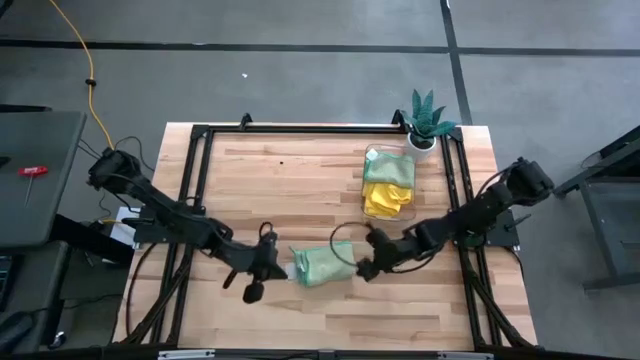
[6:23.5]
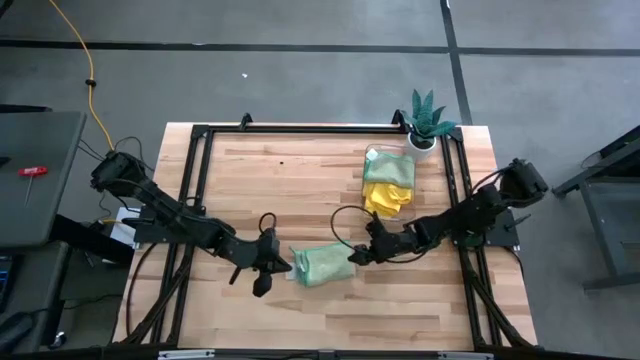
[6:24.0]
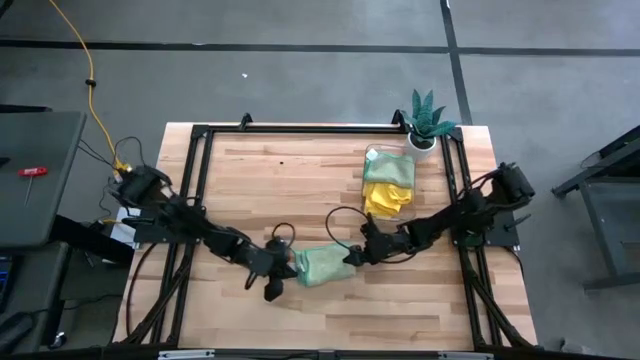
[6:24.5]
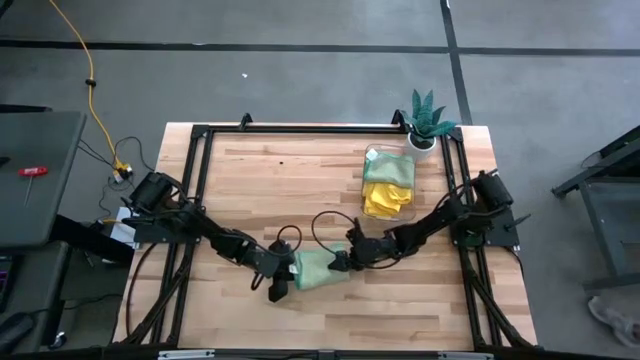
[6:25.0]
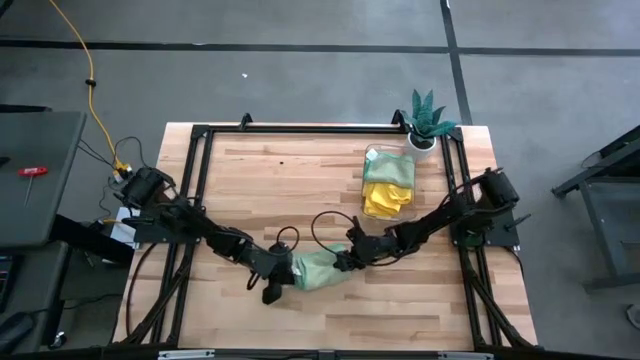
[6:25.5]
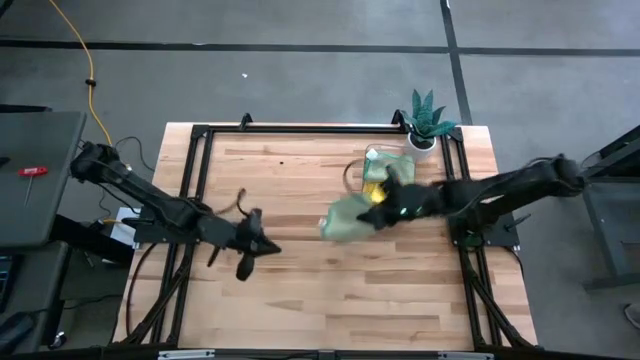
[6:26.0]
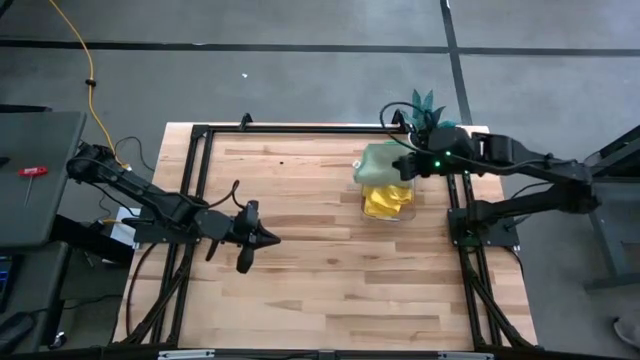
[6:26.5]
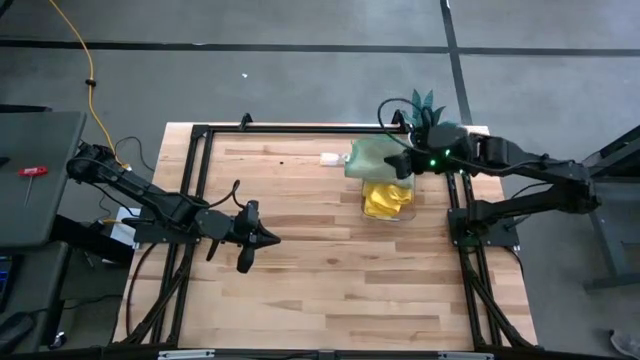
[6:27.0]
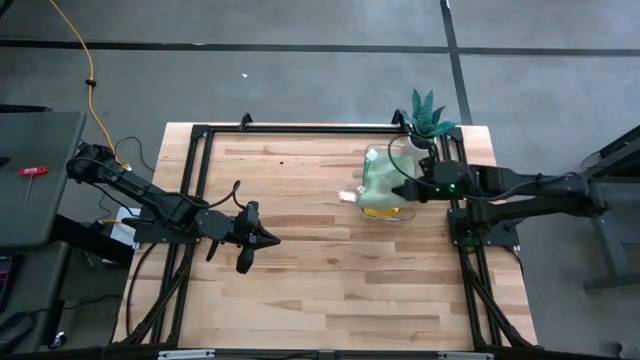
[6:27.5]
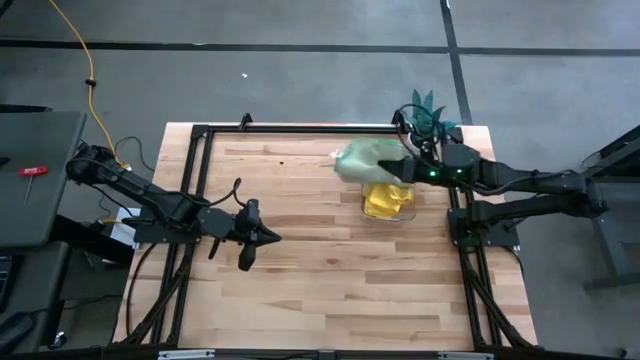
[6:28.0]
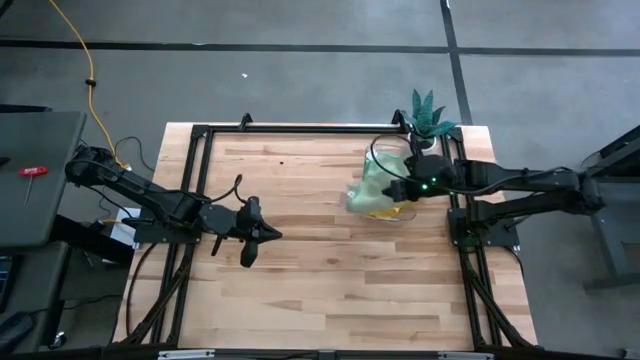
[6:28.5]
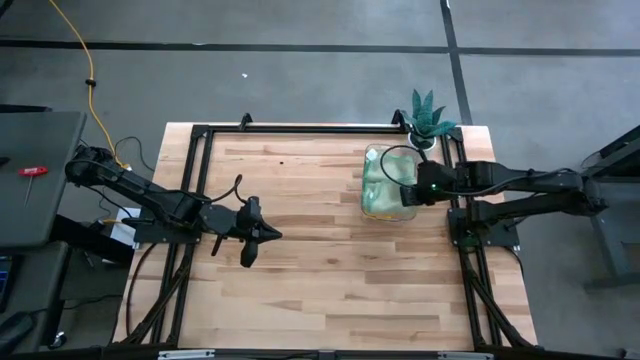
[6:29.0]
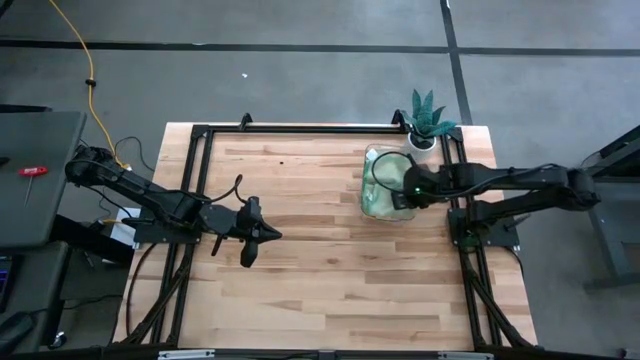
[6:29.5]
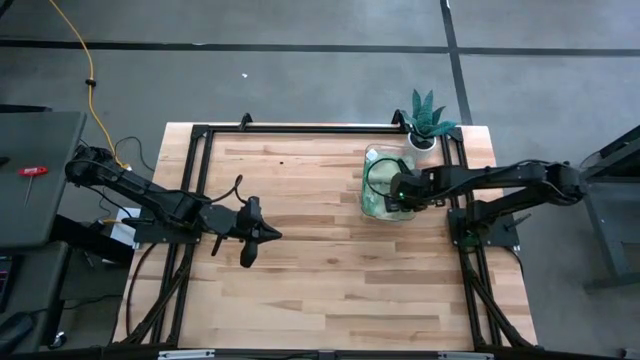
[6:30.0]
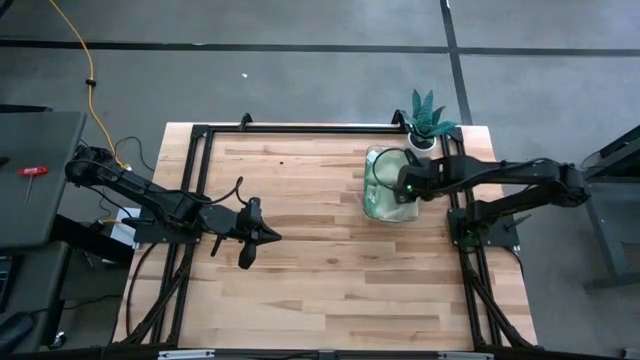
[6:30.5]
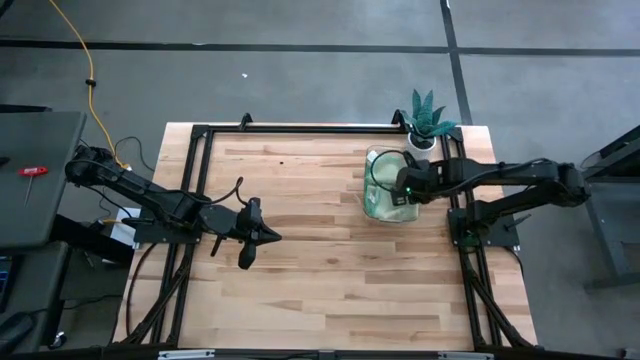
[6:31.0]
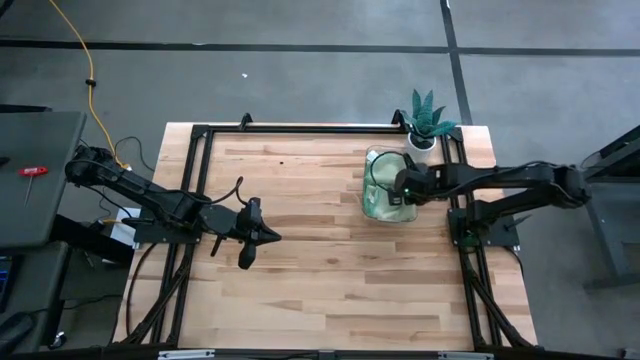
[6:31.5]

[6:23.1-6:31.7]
Task: Fold microfiber towels
Put the folded green microfiber towel into the transparent bin

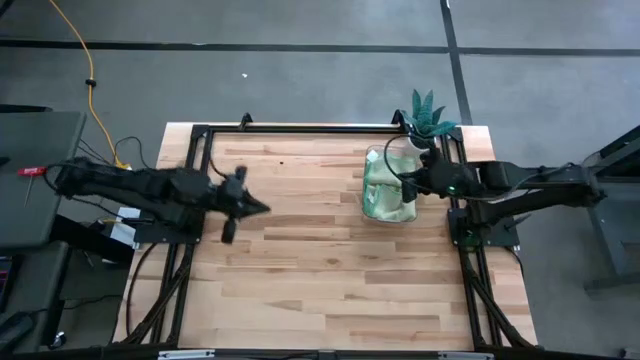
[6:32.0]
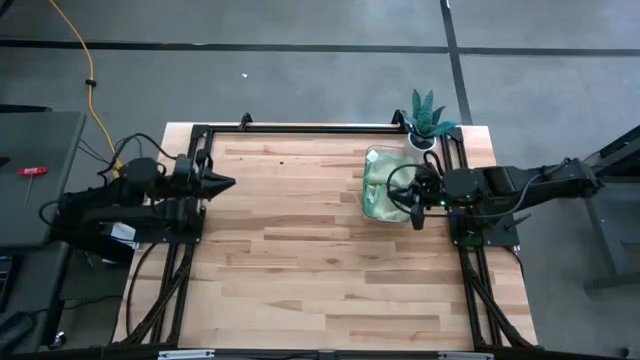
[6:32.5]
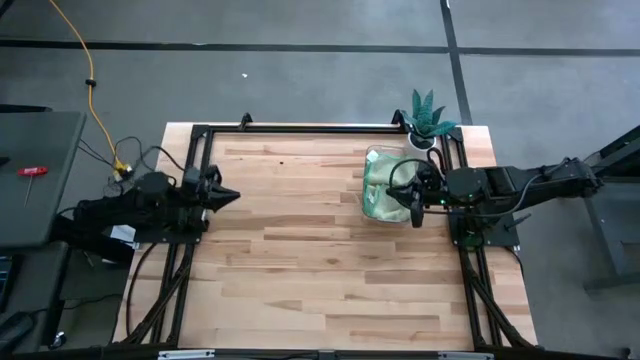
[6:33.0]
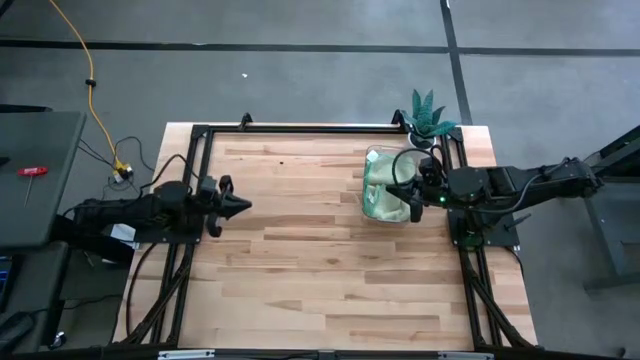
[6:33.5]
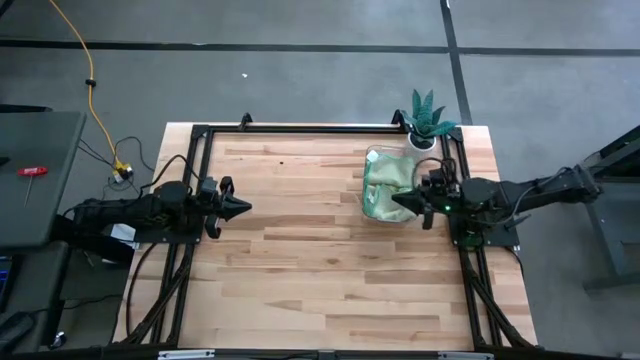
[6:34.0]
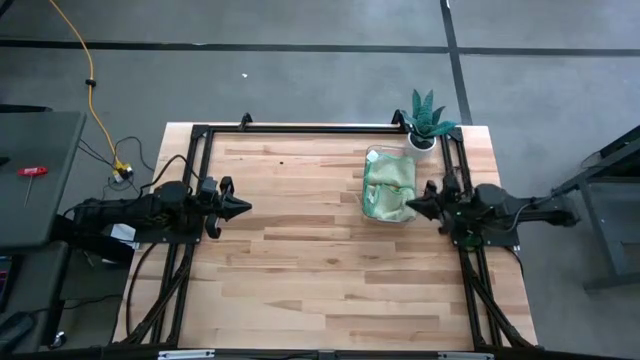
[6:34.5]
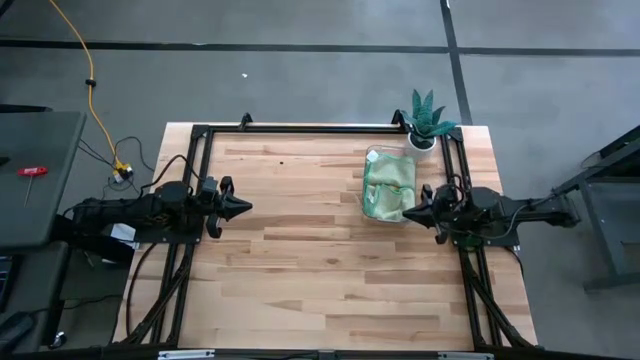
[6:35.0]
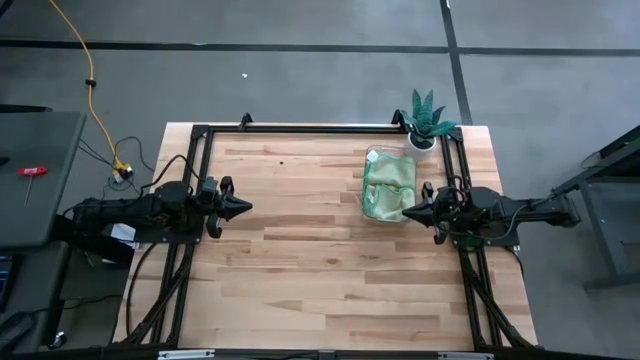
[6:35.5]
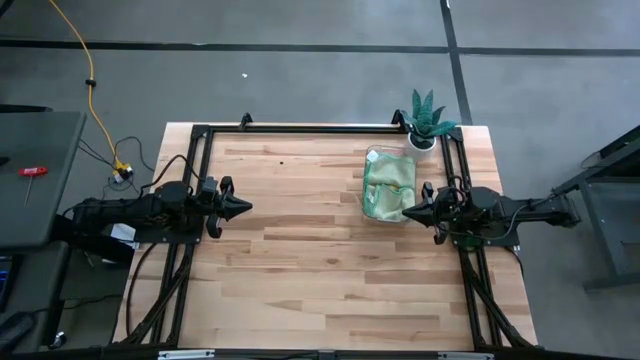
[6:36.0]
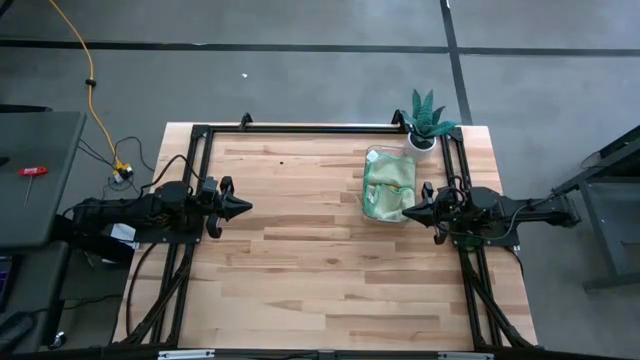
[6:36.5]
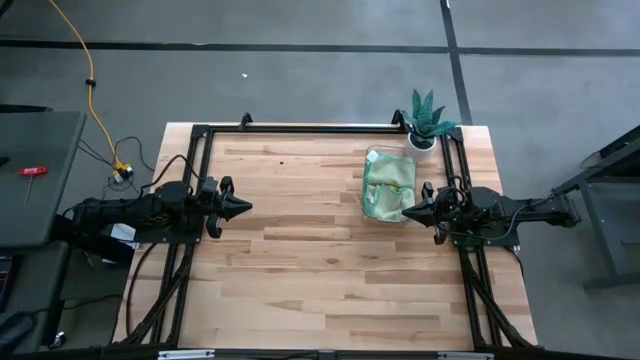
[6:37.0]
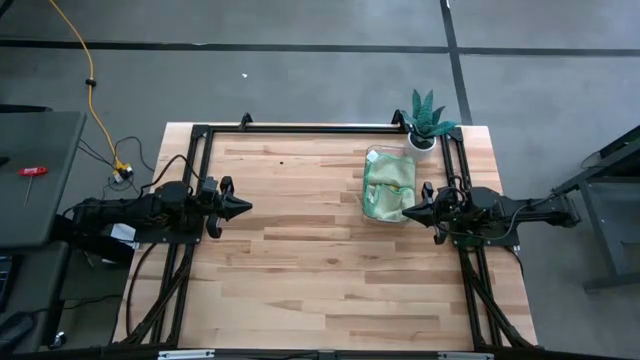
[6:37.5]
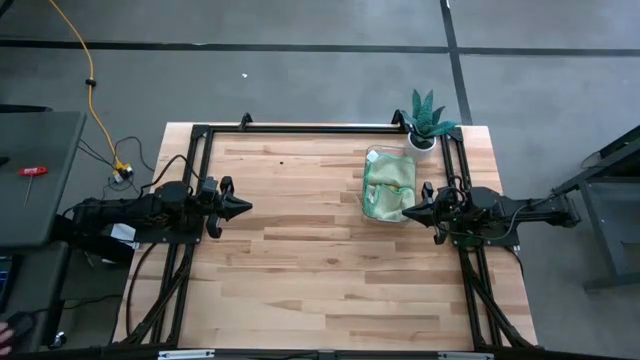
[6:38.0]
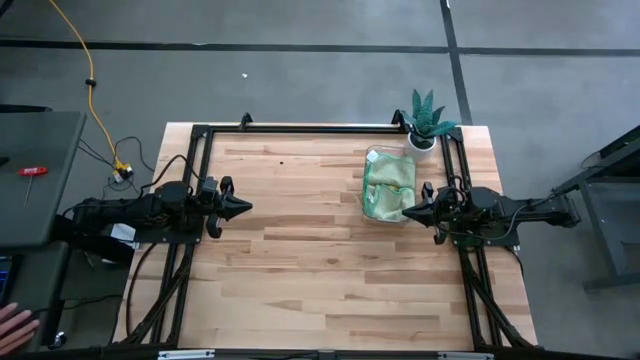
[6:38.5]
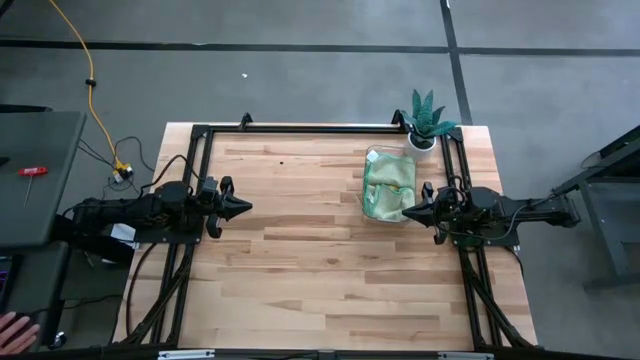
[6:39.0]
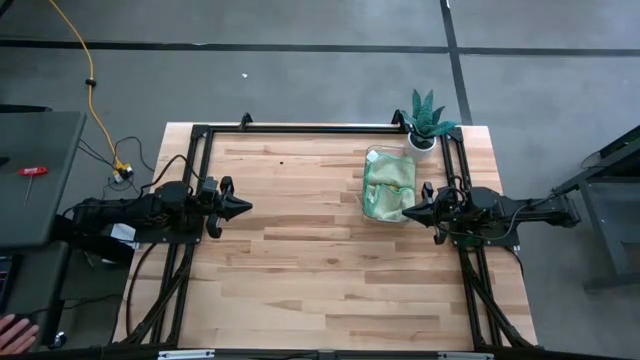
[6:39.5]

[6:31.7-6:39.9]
Return to Home Position

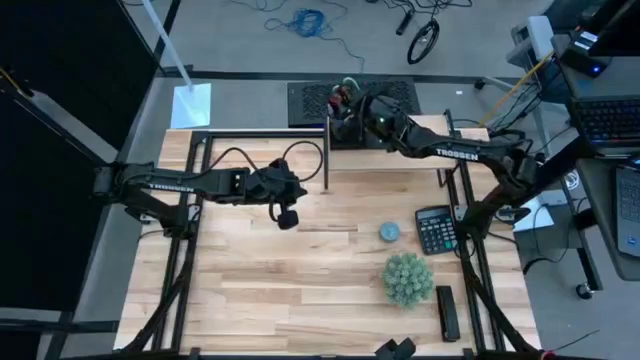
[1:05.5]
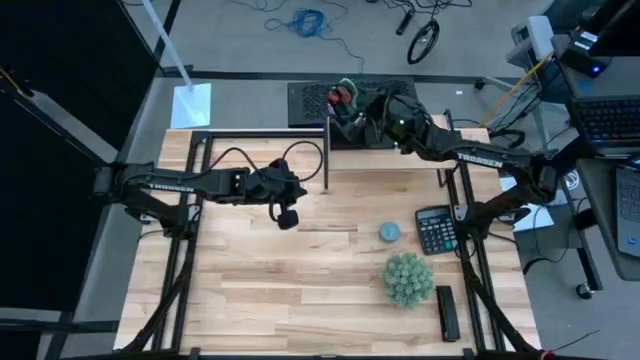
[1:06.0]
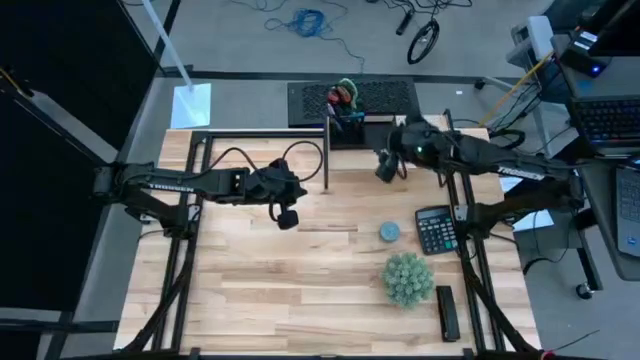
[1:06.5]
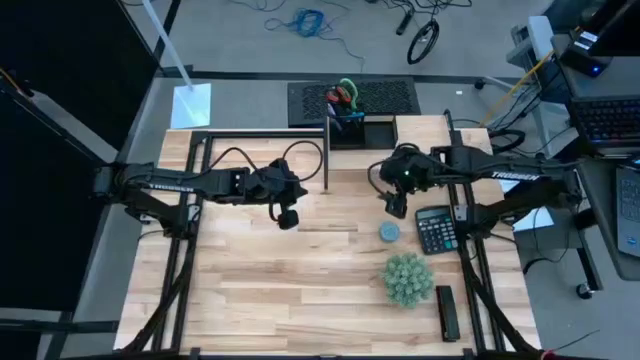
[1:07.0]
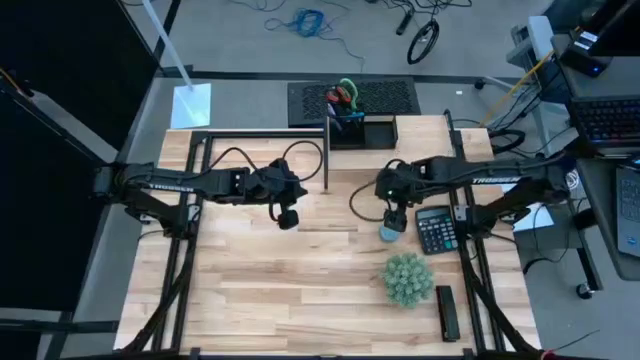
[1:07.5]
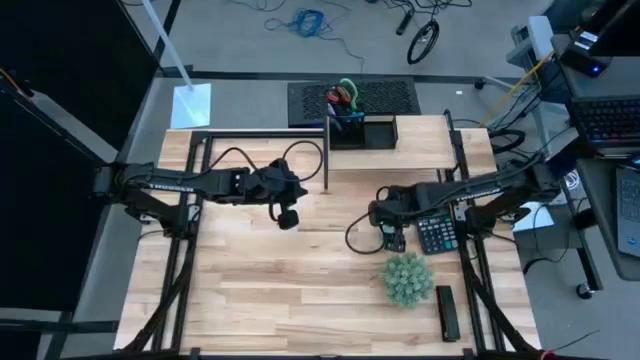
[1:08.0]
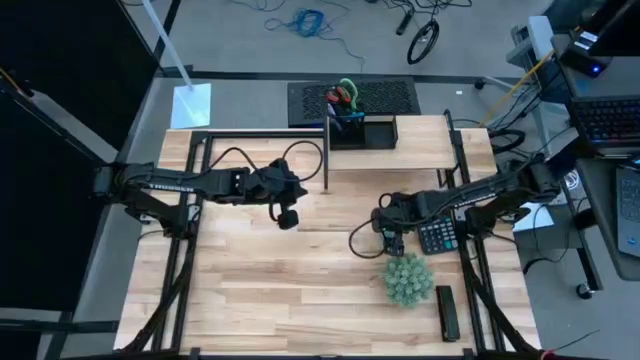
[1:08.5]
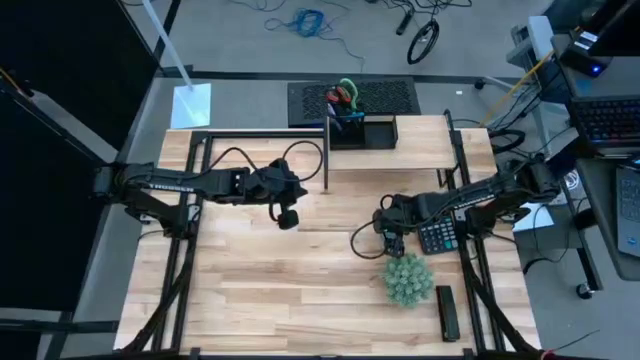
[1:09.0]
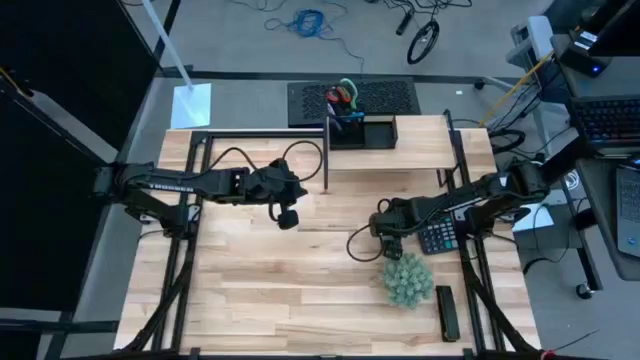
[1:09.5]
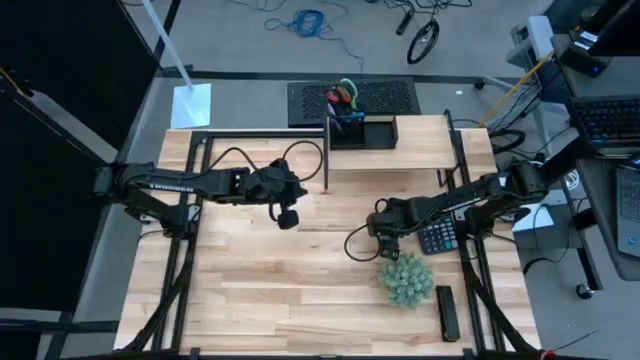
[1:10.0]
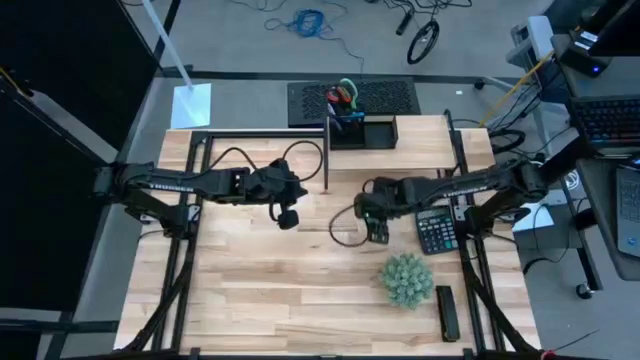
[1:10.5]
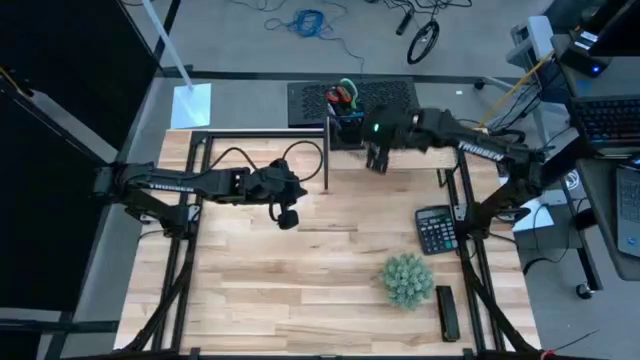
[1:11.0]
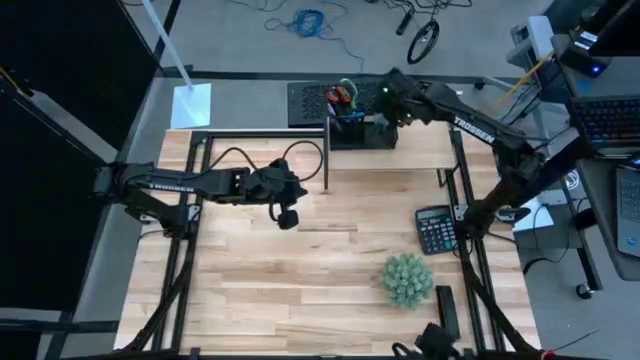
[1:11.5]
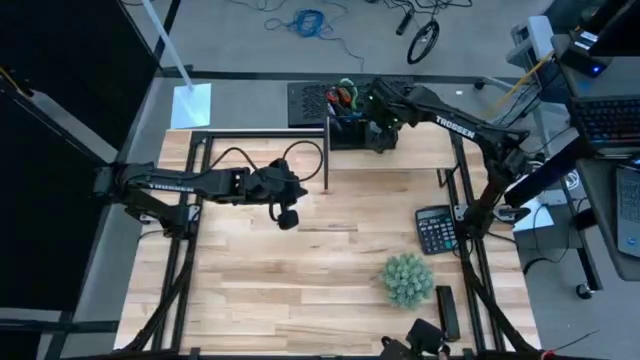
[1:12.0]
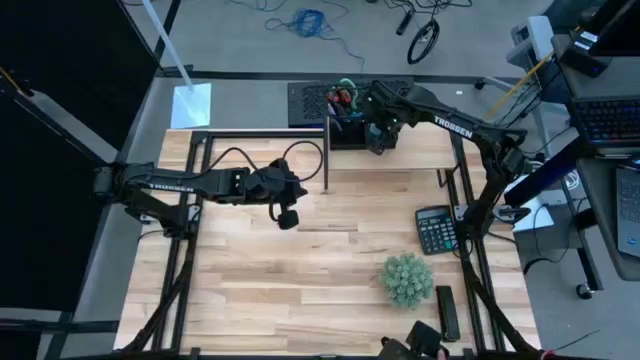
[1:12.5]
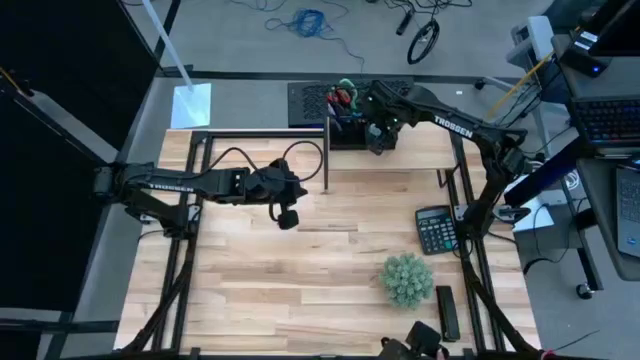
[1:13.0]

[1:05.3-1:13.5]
Task: Pick and place office supplies into organizer
Put the green scented candle into the black desk organizer on the shelf
